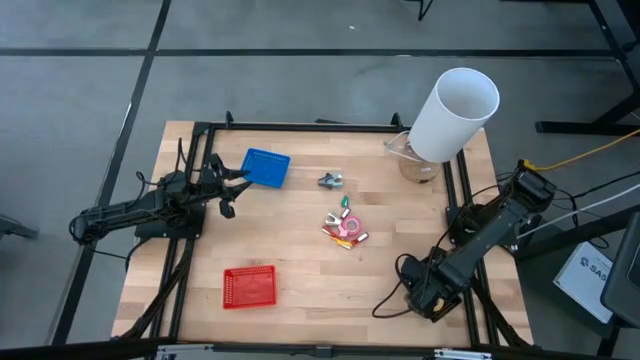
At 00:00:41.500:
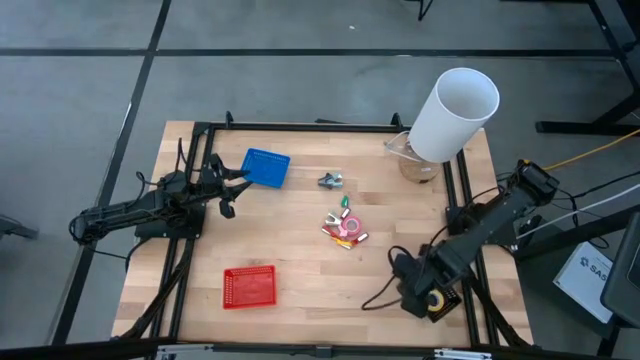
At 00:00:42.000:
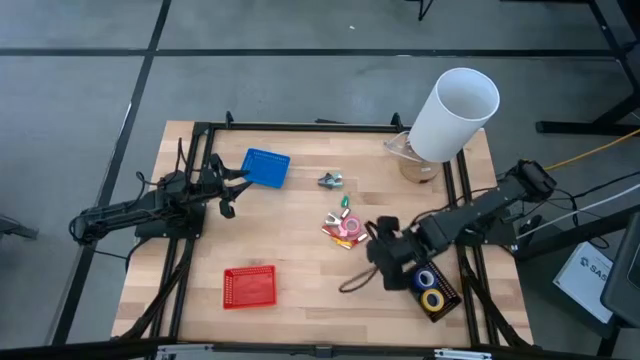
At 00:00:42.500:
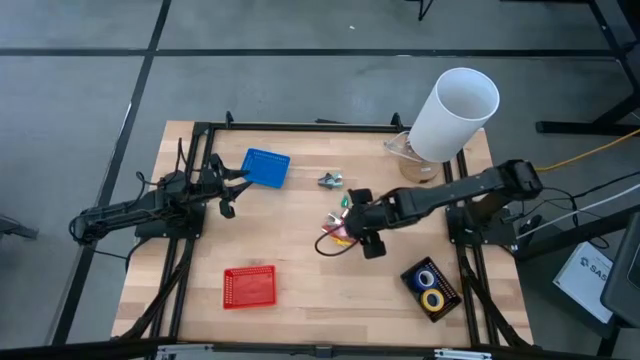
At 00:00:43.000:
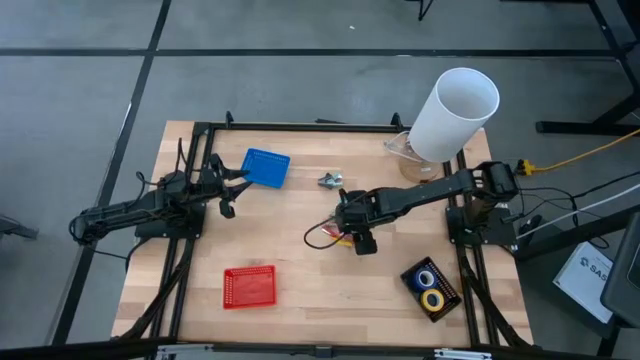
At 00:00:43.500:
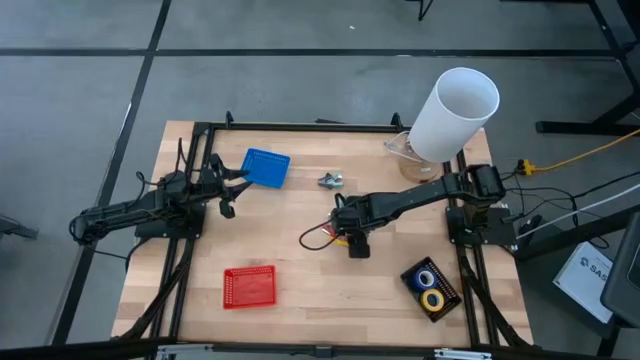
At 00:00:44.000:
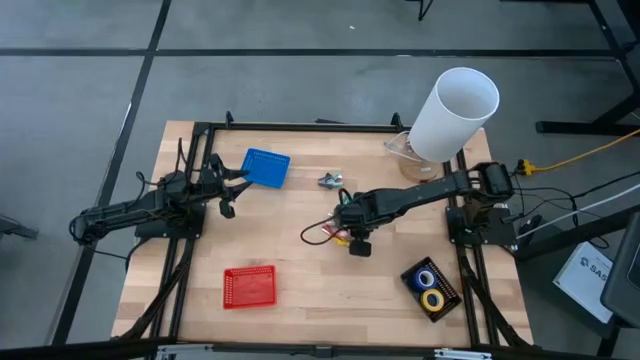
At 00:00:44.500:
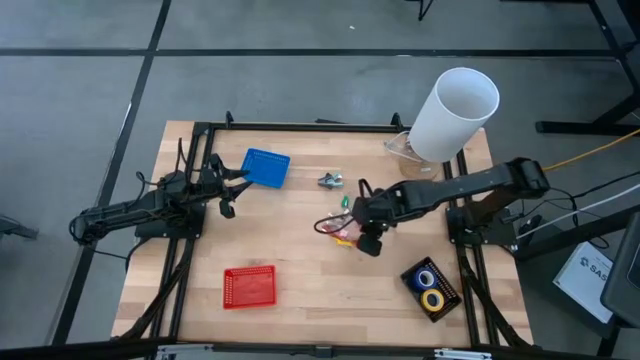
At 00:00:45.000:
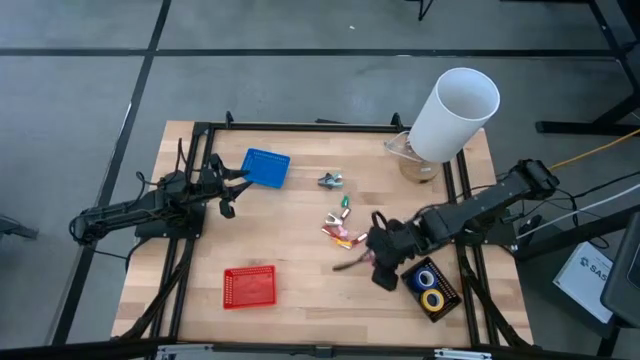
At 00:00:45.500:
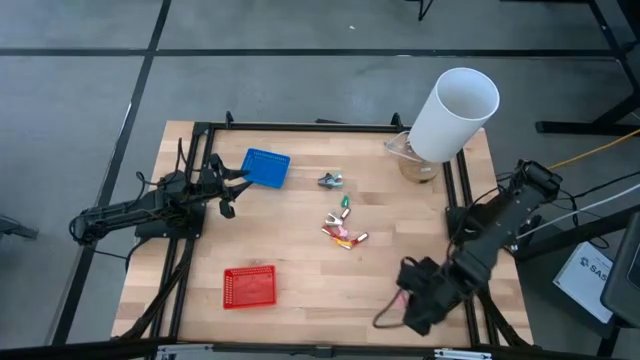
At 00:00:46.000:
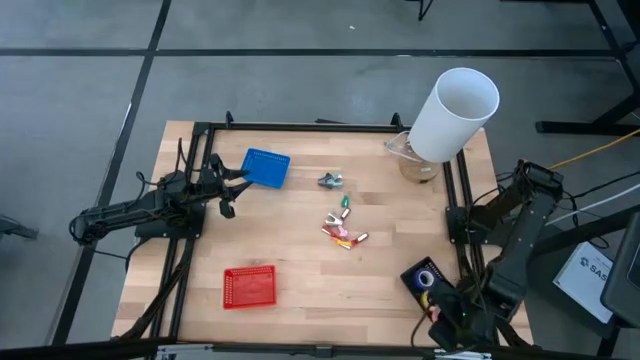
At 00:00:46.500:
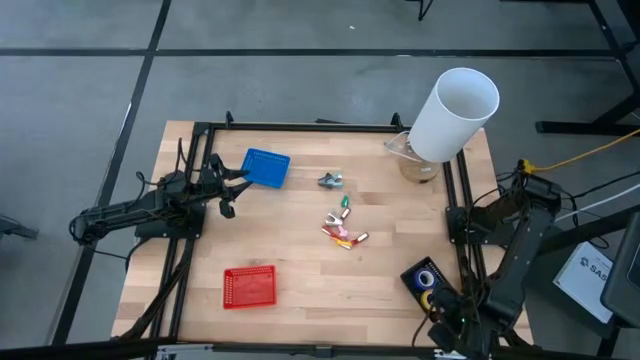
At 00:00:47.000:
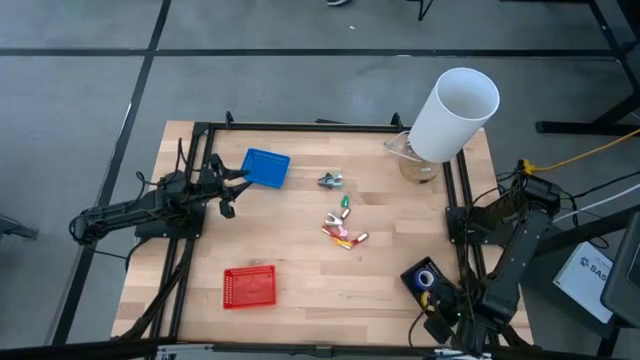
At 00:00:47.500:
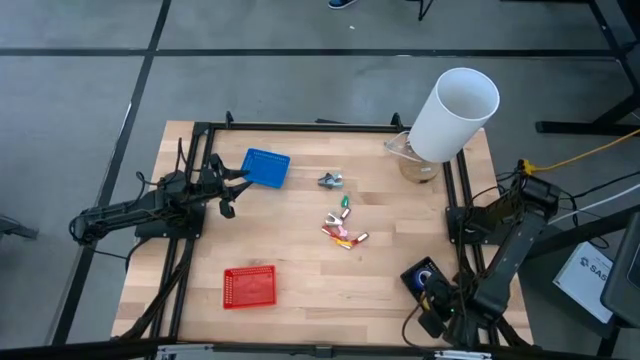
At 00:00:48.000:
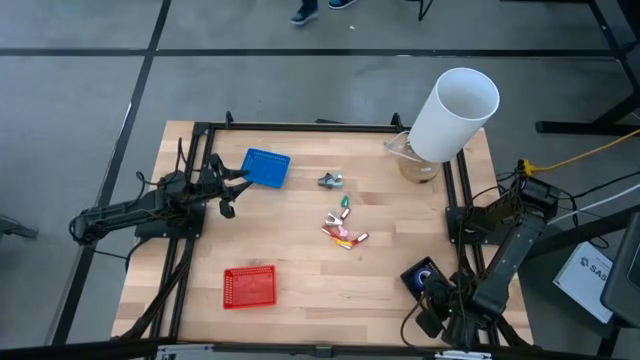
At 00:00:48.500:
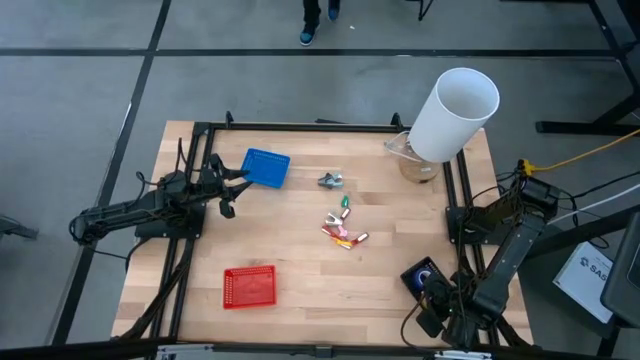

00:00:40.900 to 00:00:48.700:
Task: Pick and place Stapler, Stapler remover, tape
Put the pink tape into the black bin

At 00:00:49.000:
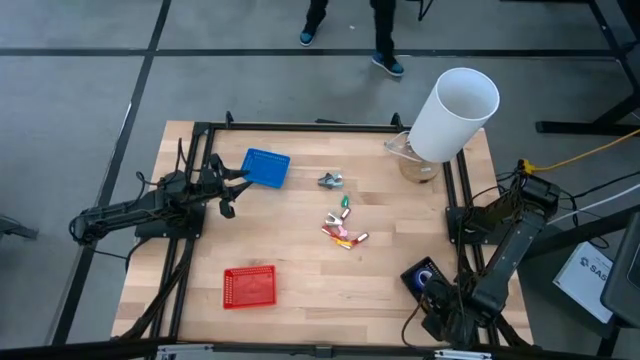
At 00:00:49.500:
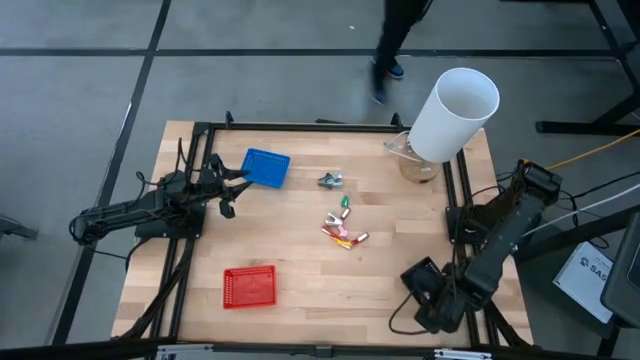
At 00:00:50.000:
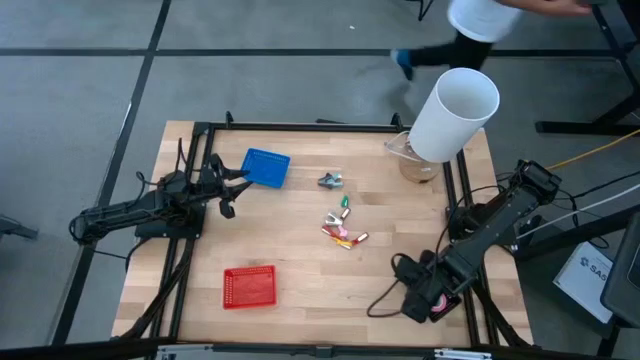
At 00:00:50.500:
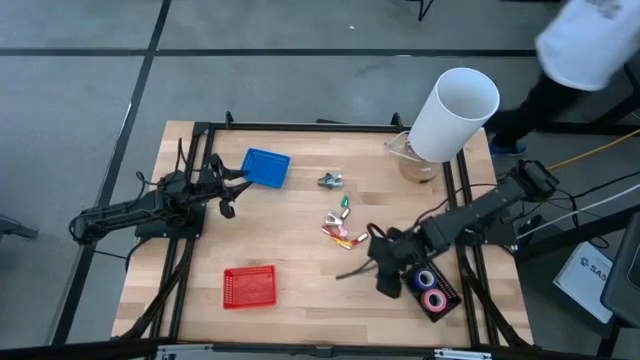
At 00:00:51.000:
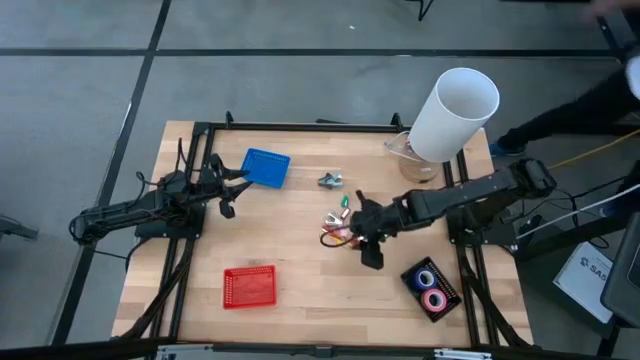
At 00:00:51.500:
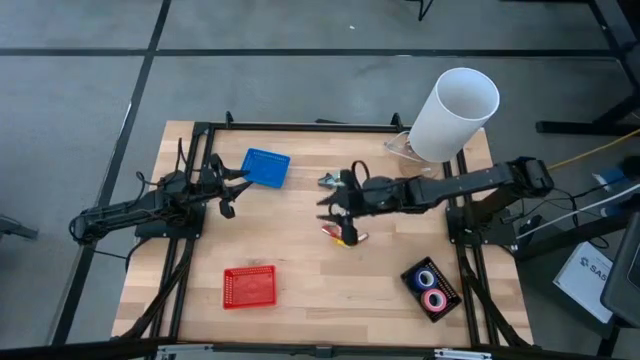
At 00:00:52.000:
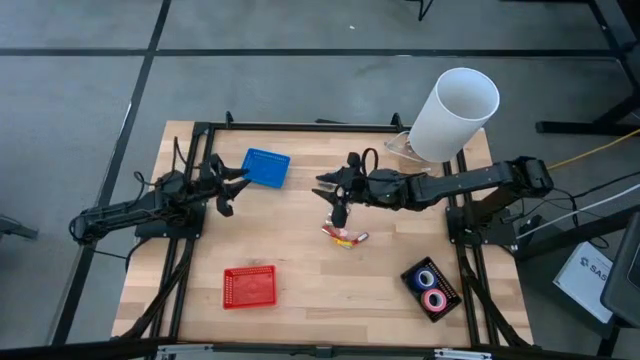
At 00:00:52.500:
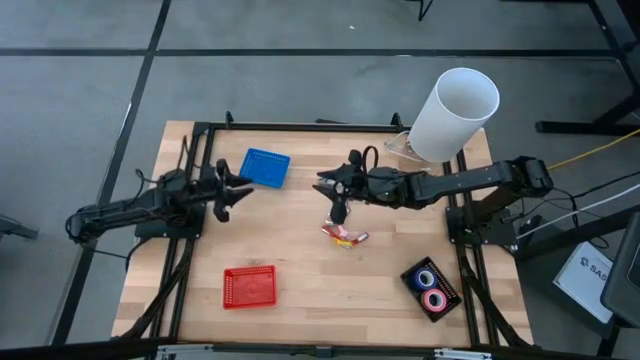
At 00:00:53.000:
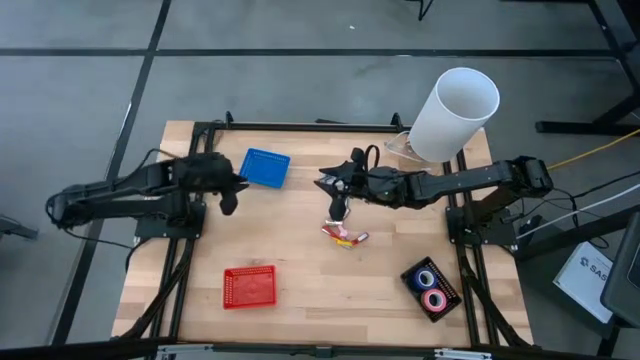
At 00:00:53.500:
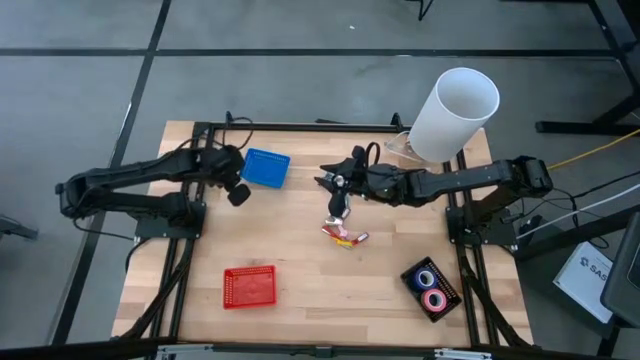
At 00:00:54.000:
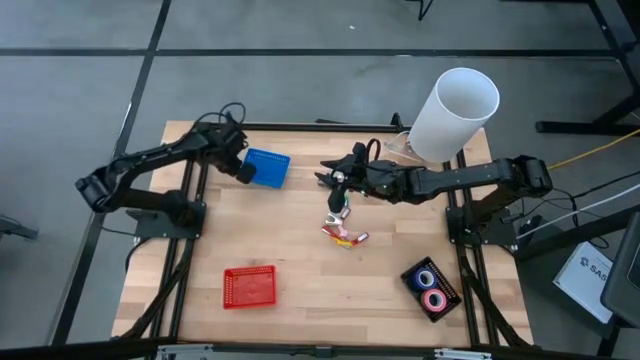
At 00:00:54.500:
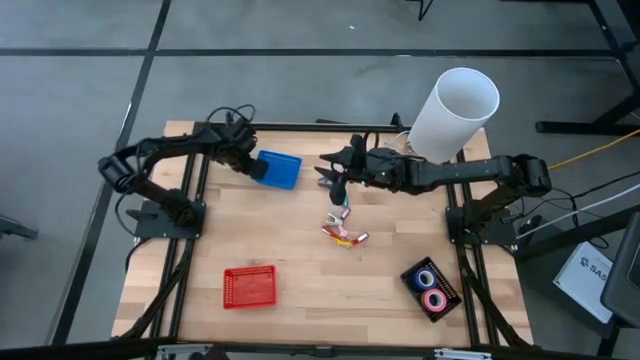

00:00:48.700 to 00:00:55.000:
Adjust the blue bin

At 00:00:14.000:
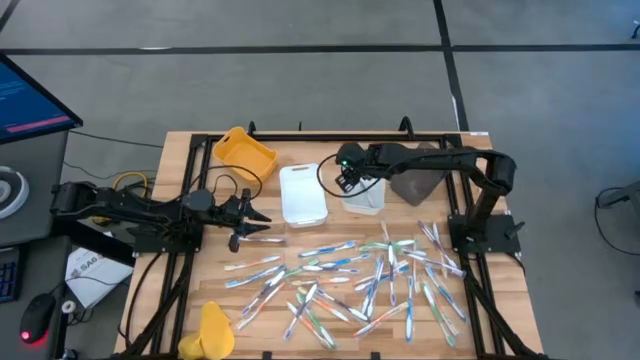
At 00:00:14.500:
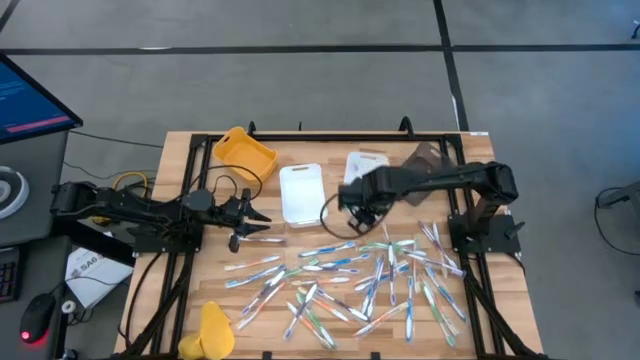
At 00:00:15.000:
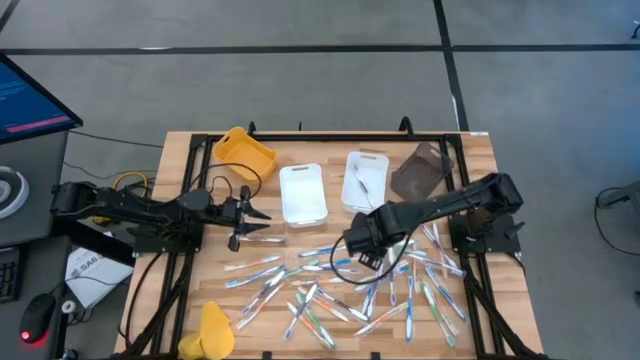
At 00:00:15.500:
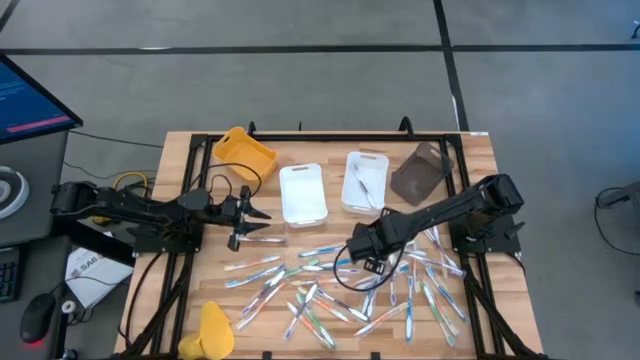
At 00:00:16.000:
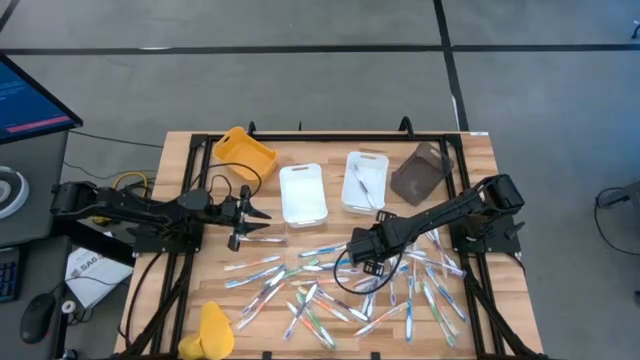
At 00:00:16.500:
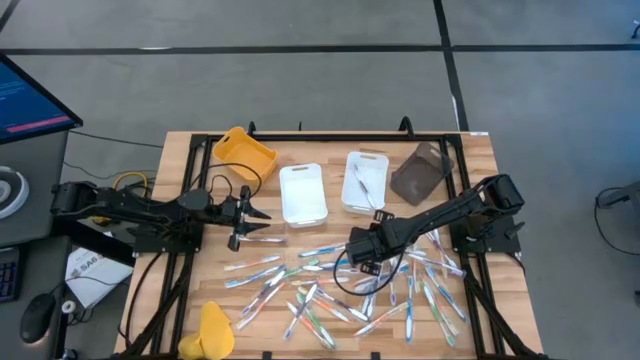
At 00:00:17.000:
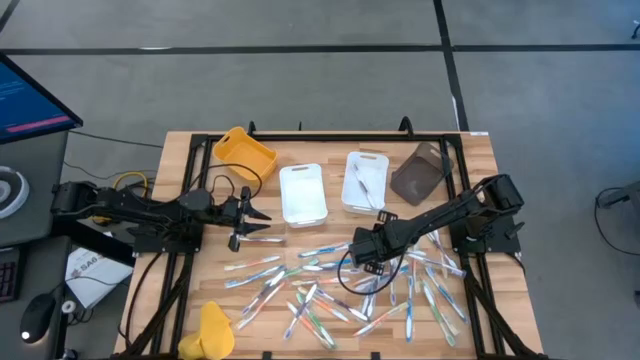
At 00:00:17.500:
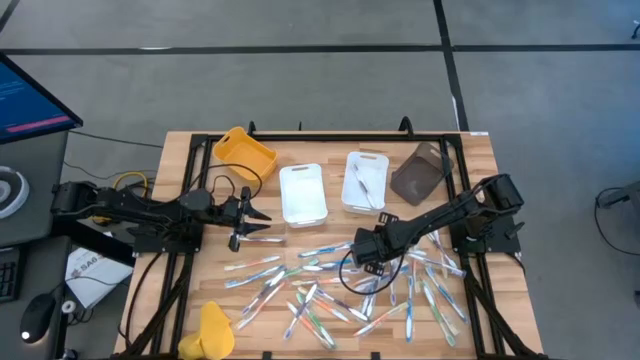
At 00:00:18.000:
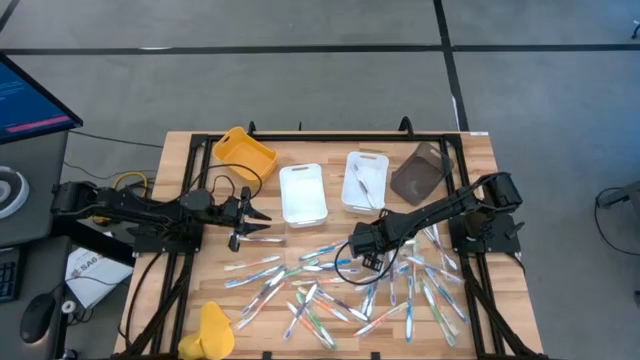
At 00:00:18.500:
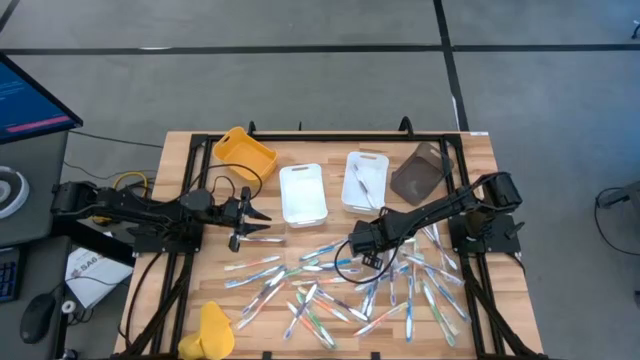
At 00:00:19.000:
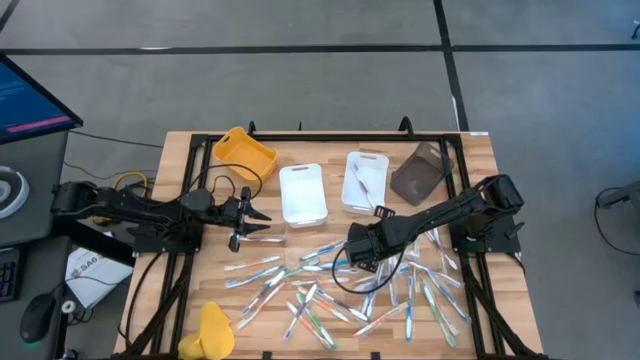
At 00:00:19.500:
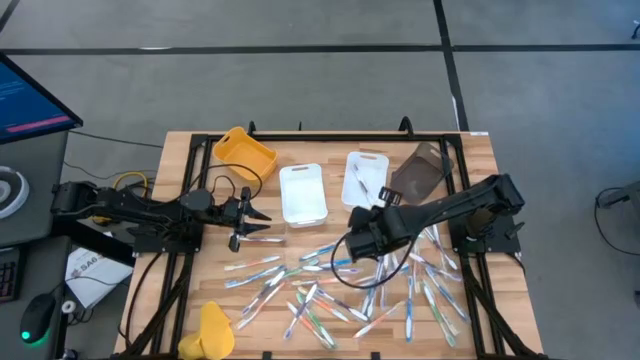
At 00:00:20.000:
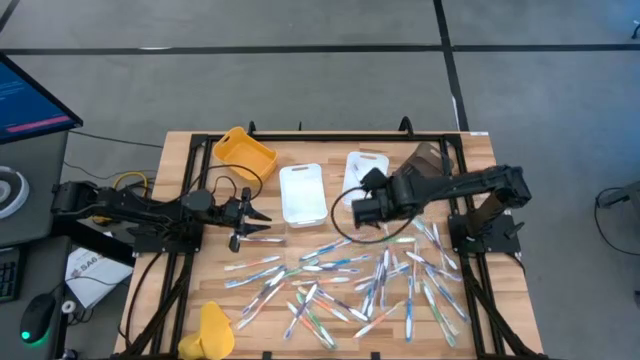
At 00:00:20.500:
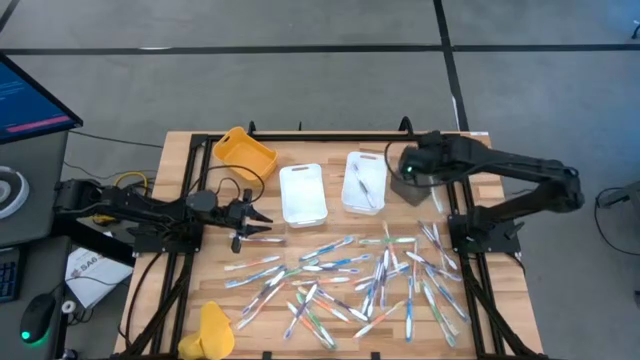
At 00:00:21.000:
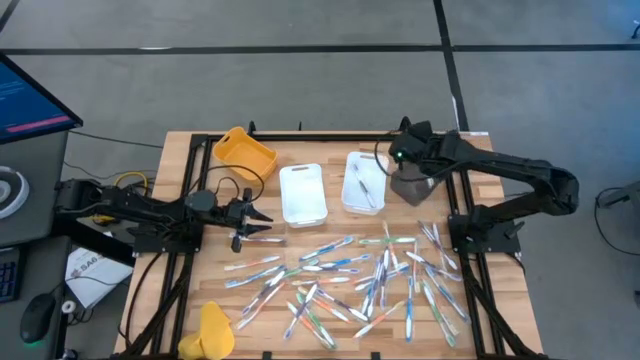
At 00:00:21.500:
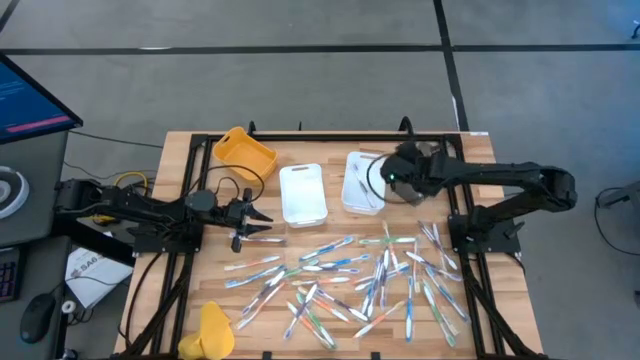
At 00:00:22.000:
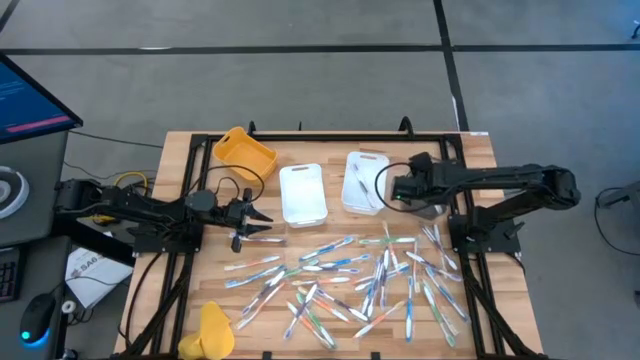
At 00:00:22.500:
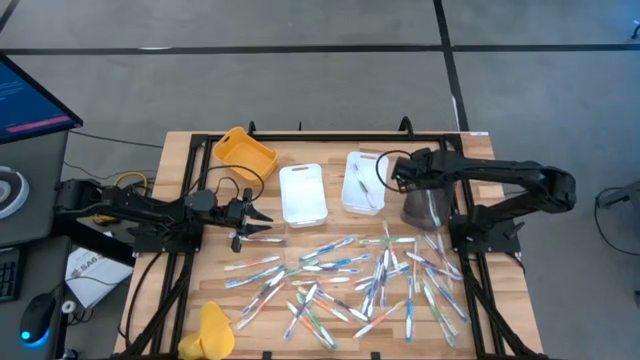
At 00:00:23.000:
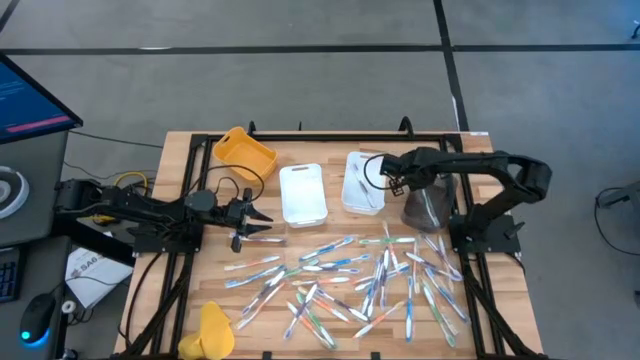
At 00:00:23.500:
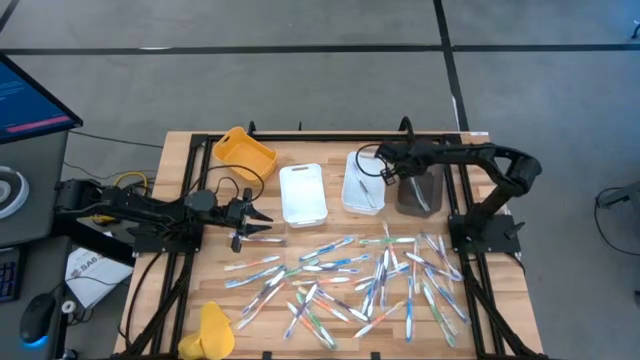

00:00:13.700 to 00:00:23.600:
Task: Pick & Place Toothbrushes
Put the green toothbrush into the black bin
